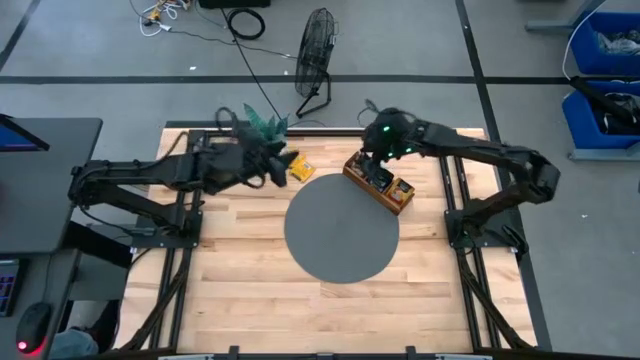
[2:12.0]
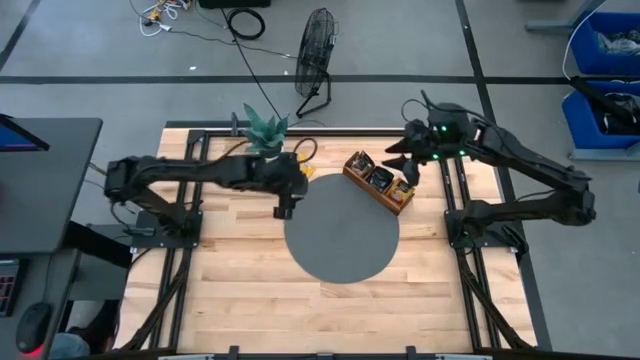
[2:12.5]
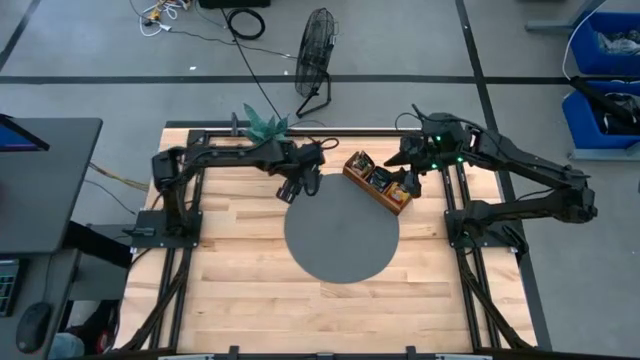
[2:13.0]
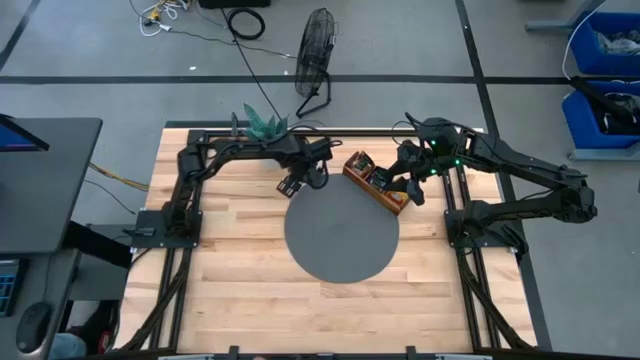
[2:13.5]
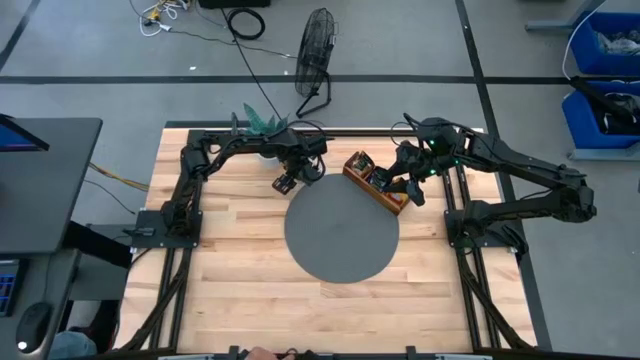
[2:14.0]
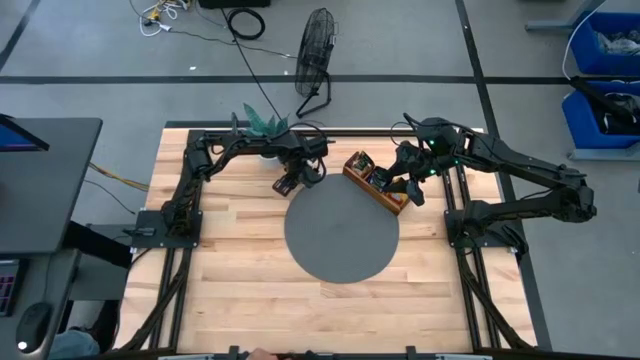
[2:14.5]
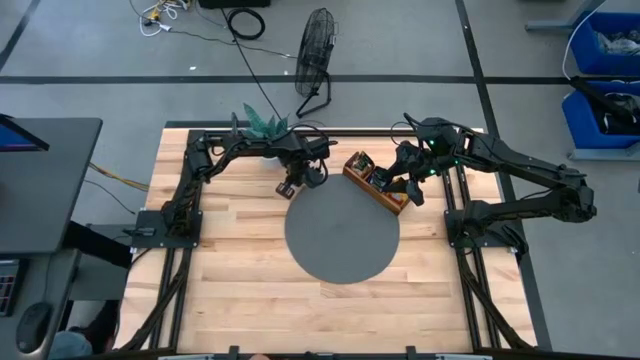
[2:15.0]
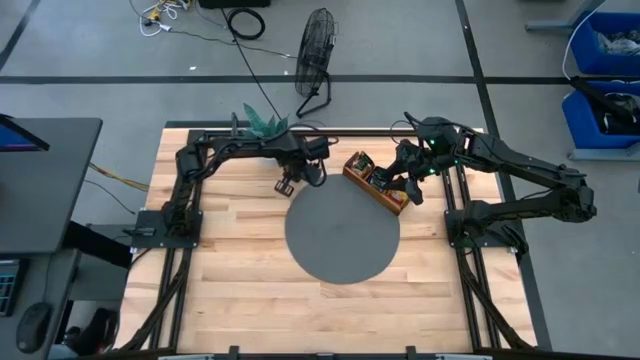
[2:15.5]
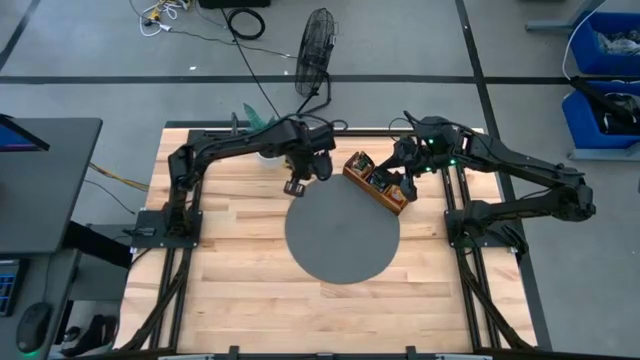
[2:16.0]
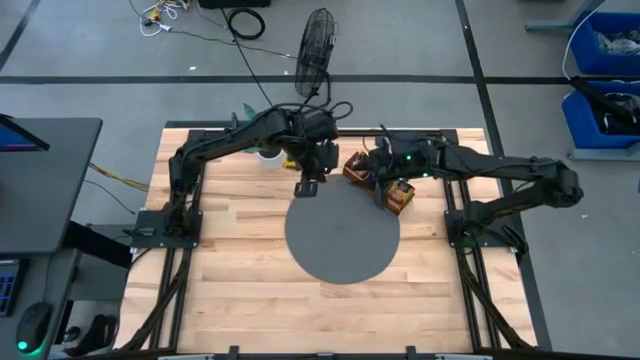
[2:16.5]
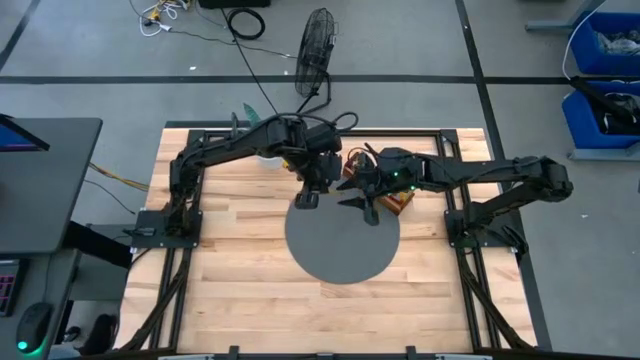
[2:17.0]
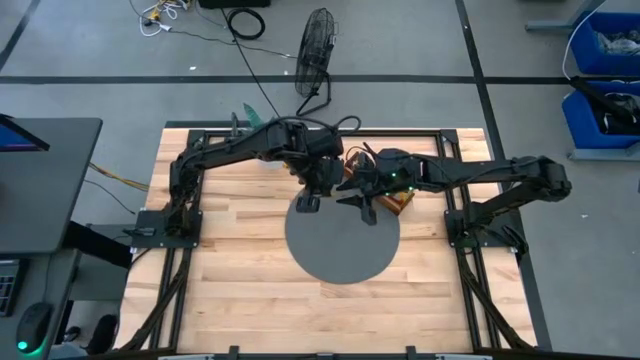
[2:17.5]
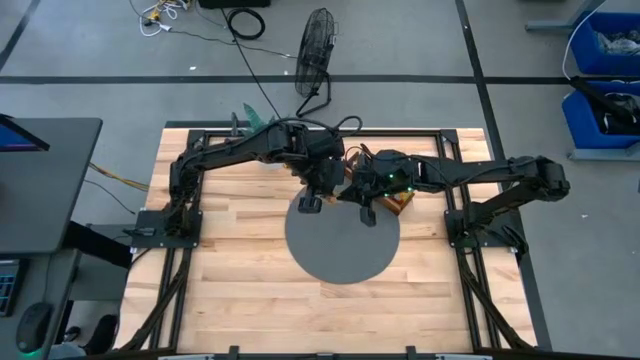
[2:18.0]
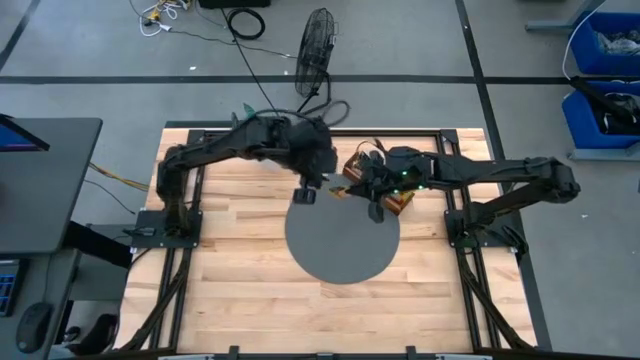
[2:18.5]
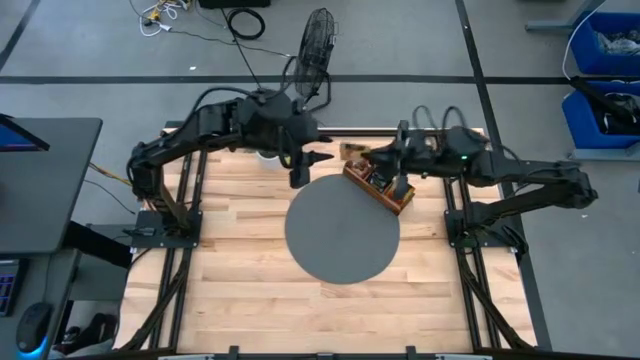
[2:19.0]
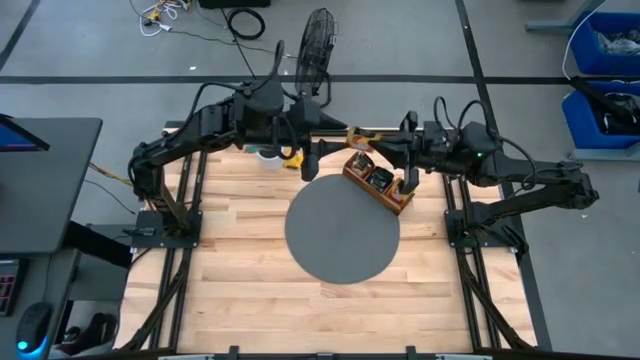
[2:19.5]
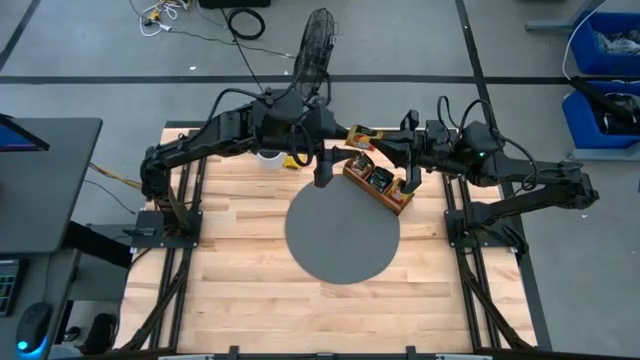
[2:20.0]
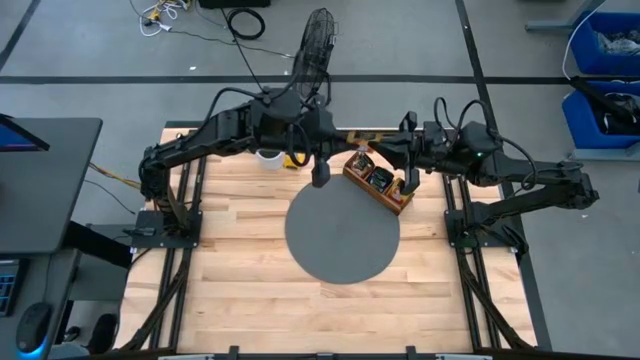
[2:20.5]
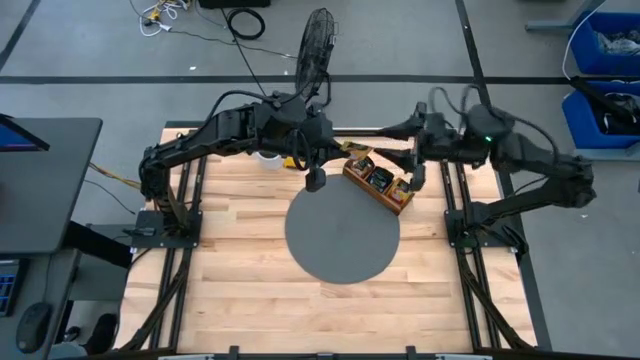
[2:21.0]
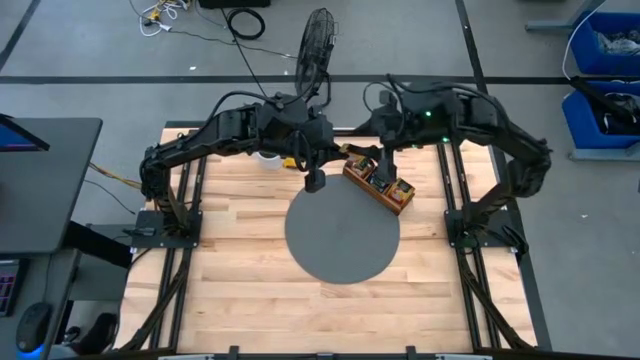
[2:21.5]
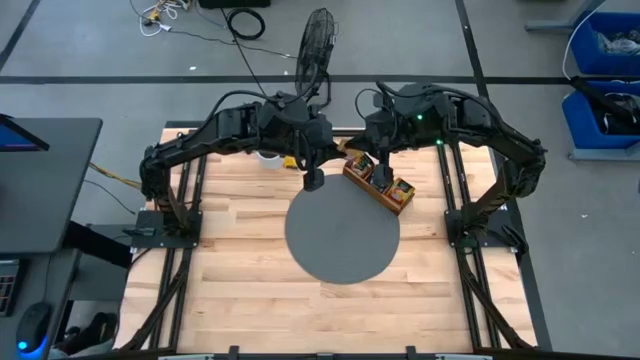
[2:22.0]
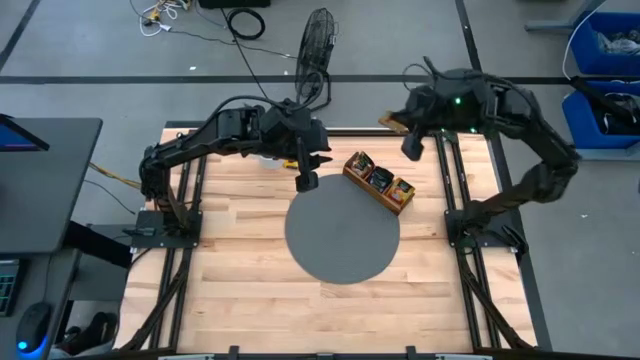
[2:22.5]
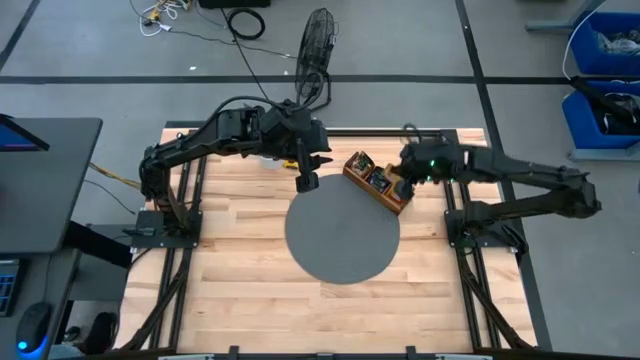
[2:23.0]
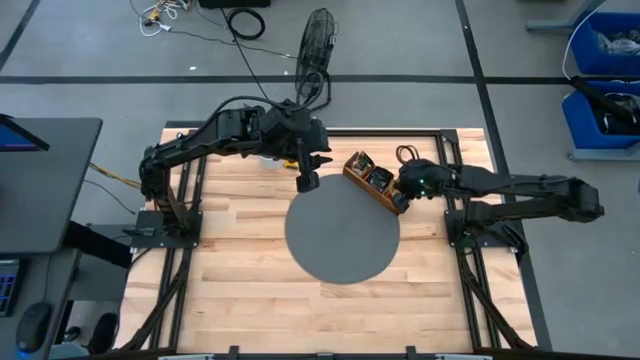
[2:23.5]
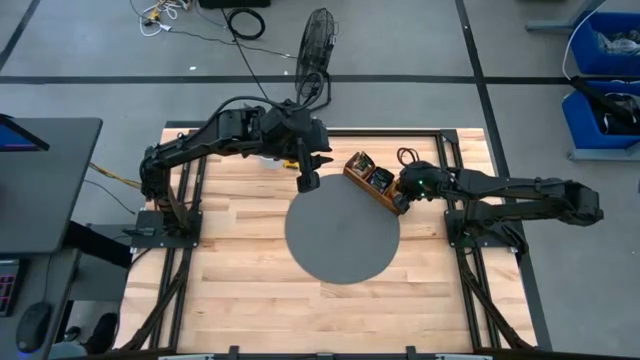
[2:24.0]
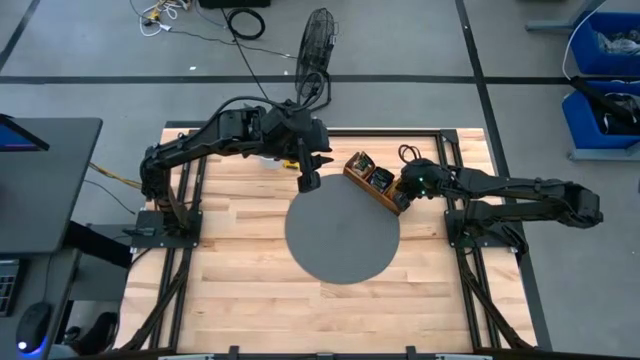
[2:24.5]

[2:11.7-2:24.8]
Task: Pick & Place Tea
Put the yellow tea bag into the right section of the wooden organizer
